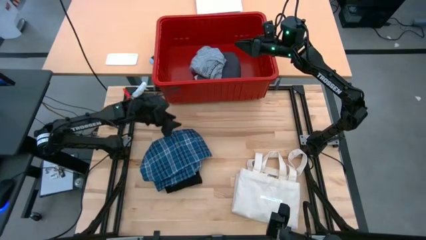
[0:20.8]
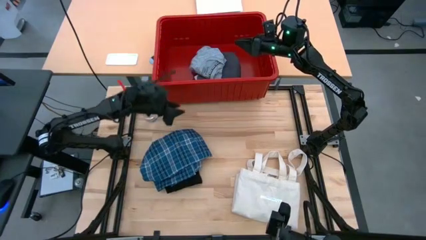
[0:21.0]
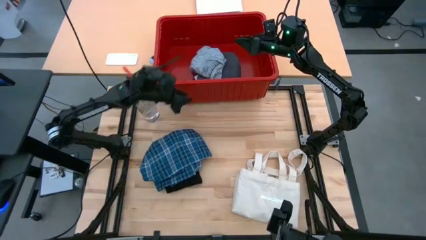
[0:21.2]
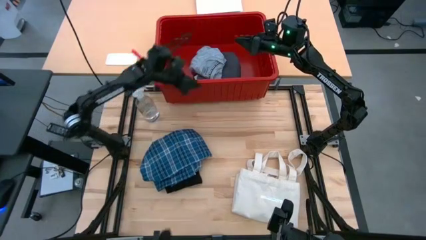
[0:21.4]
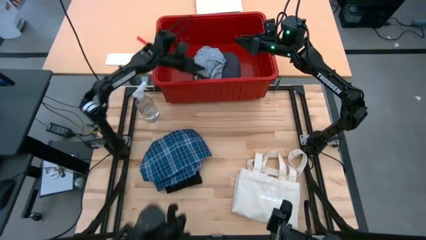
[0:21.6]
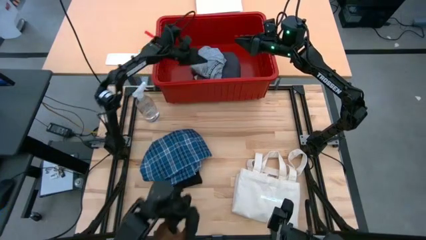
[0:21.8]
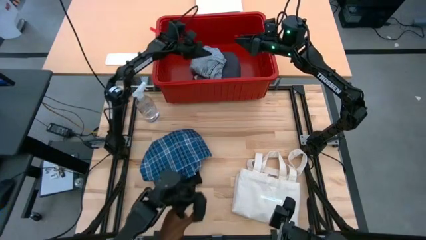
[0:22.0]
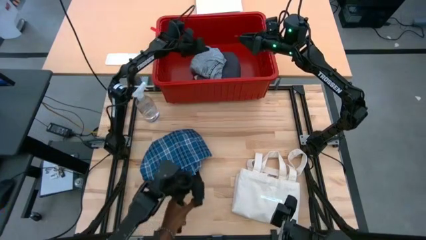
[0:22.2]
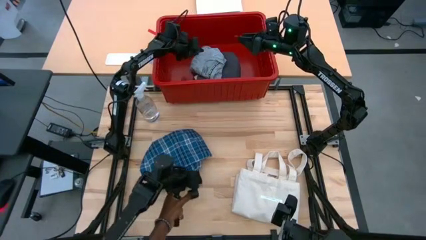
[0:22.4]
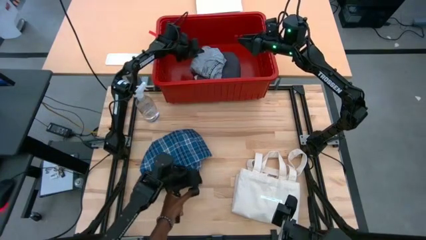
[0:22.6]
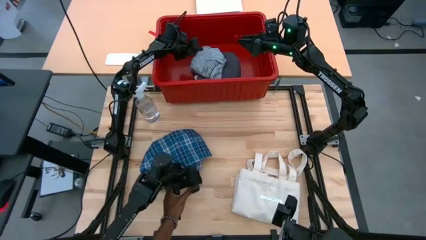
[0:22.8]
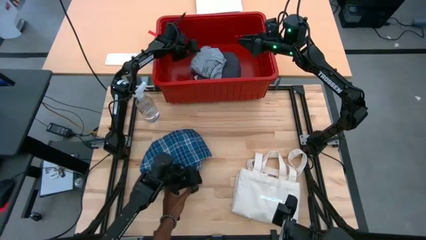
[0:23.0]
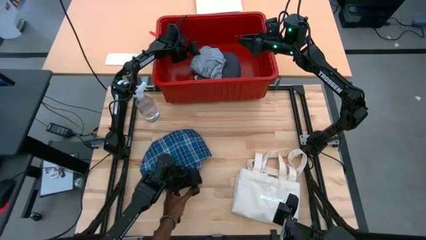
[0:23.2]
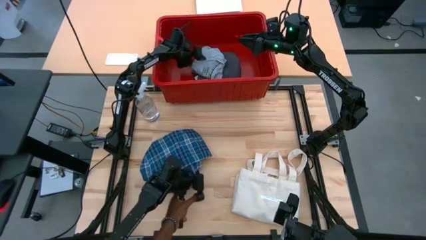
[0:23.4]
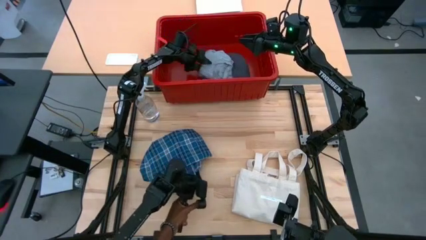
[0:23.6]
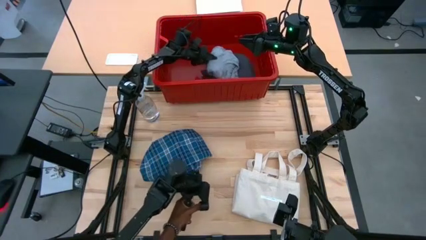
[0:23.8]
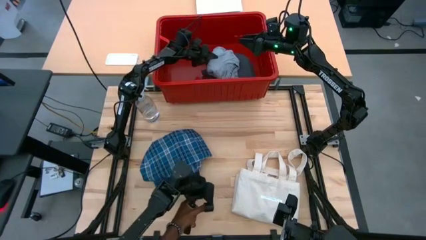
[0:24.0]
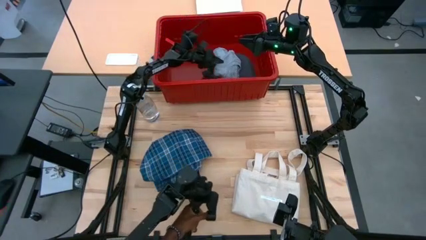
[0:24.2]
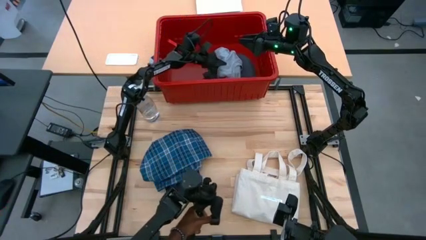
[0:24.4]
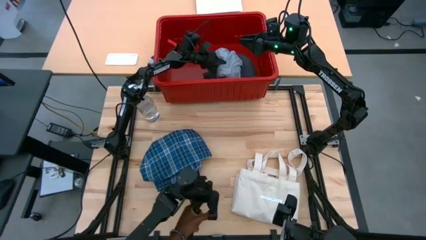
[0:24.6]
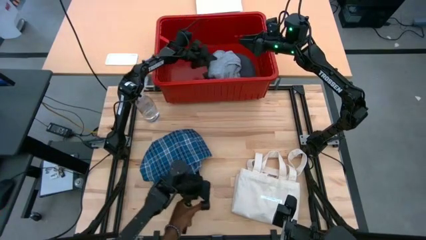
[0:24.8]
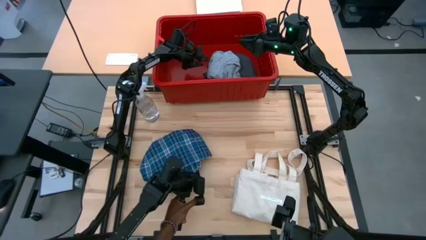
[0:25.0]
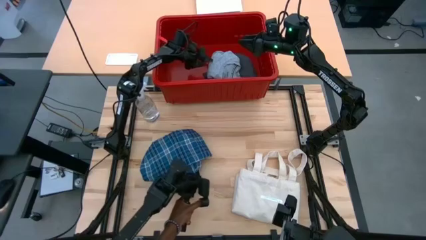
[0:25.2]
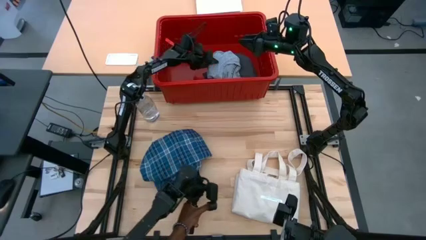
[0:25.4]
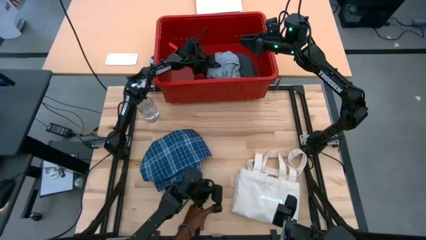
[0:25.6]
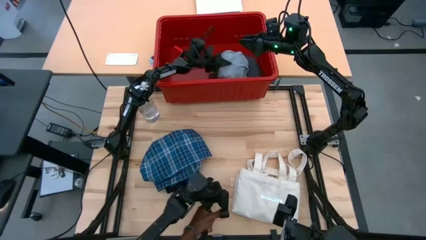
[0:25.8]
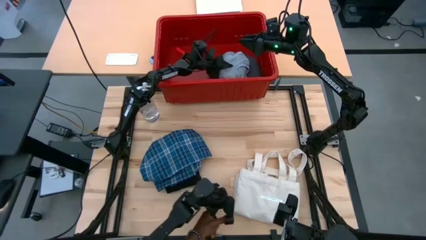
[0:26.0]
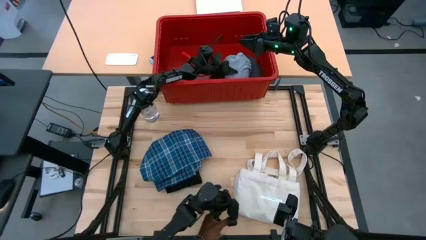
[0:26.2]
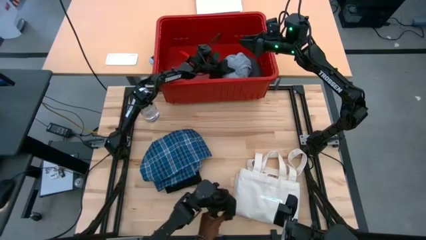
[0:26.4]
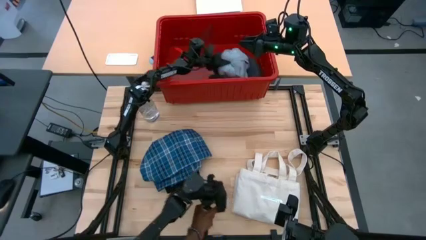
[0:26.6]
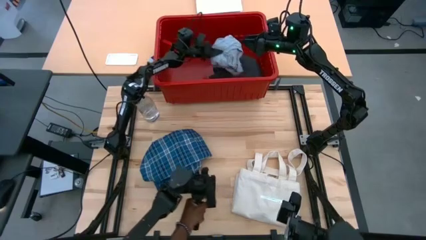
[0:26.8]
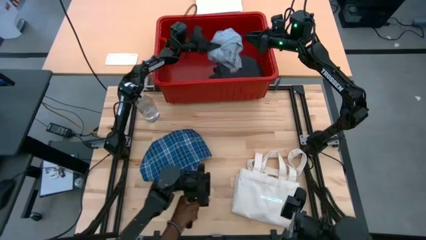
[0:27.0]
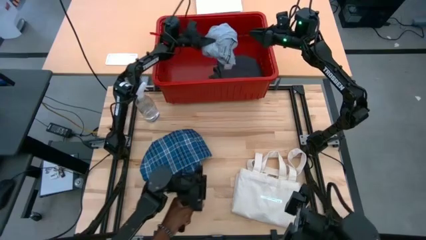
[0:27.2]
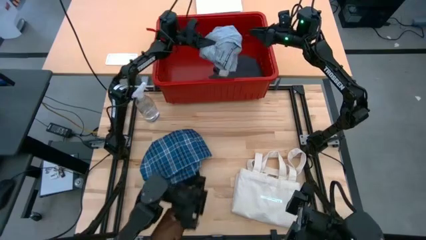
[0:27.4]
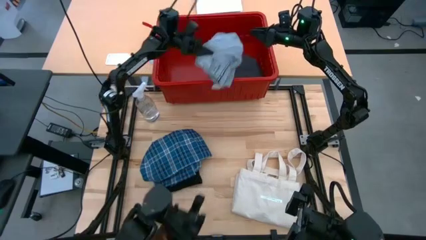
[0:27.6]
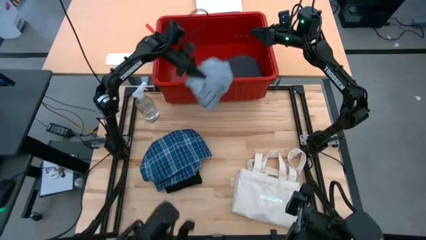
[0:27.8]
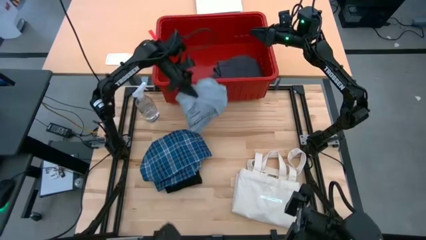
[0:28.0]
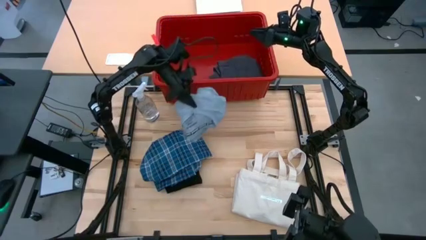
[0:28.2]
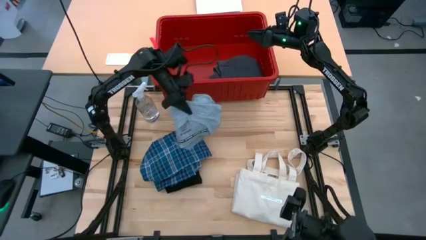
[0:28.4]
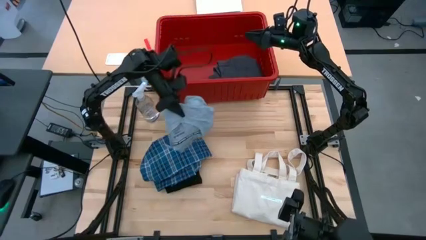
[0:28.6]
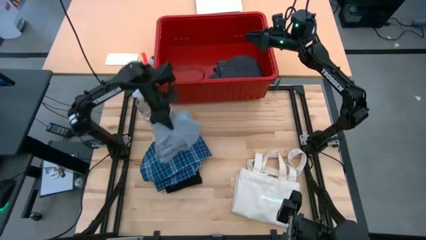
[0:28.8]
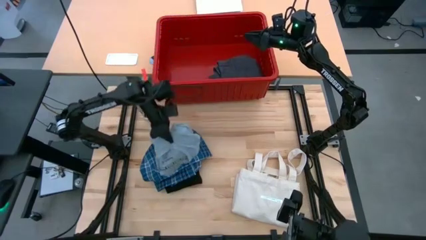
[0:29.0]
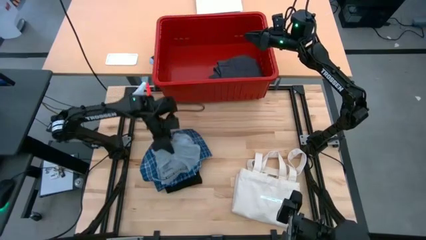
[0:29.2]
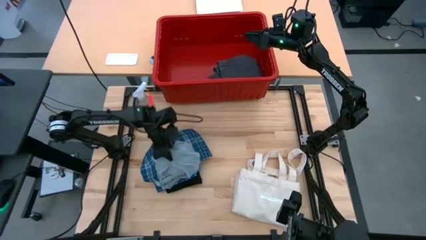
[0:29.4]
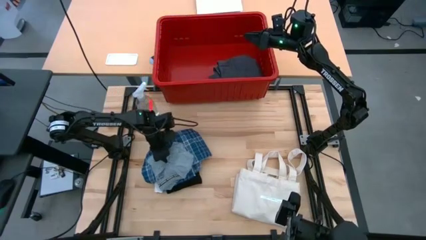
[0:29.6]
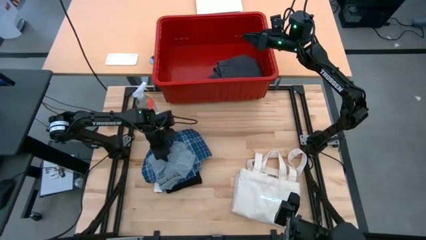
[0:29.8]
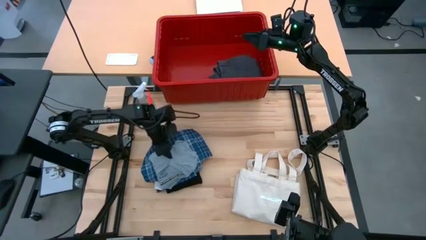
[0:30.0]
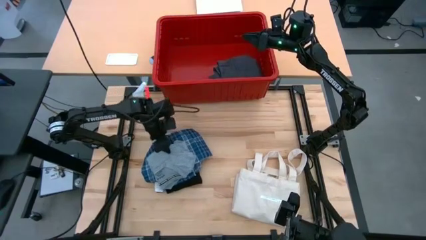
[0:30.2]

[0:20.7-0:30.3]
Task: Fold laundry
Remove the gray shirt from the red bin

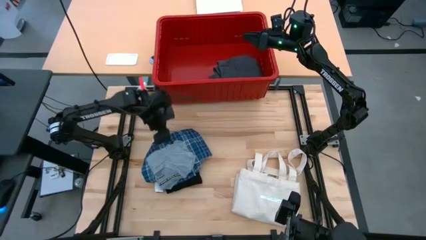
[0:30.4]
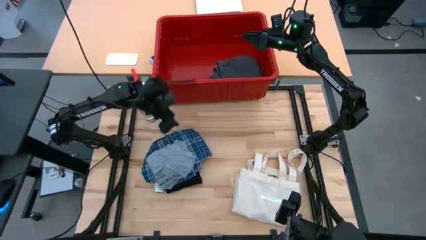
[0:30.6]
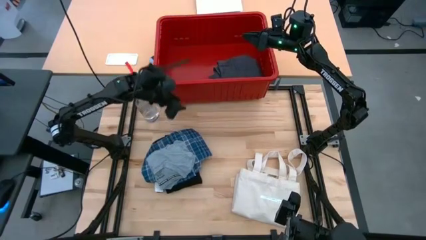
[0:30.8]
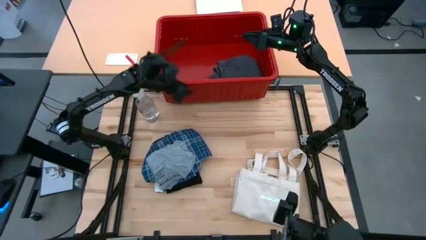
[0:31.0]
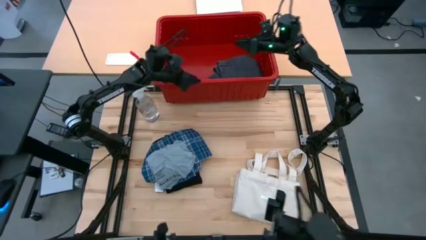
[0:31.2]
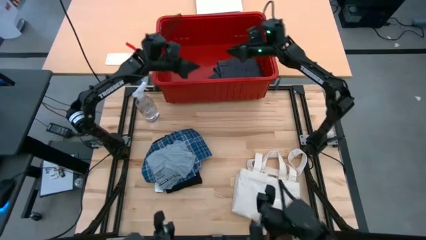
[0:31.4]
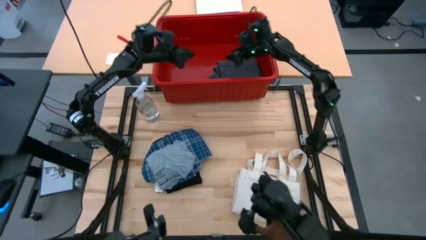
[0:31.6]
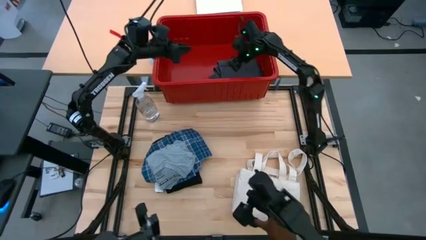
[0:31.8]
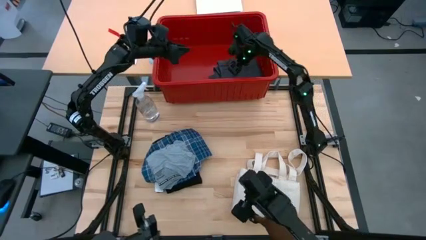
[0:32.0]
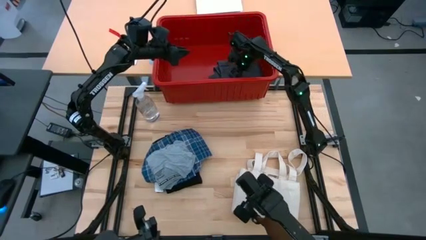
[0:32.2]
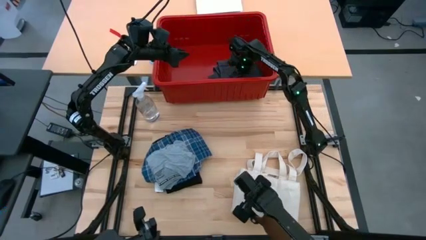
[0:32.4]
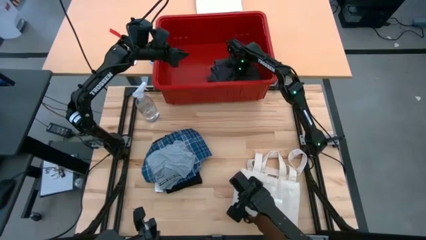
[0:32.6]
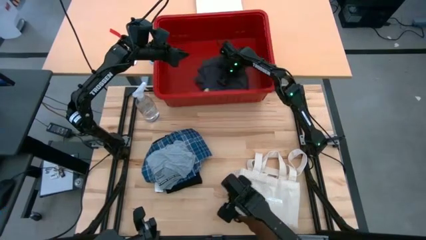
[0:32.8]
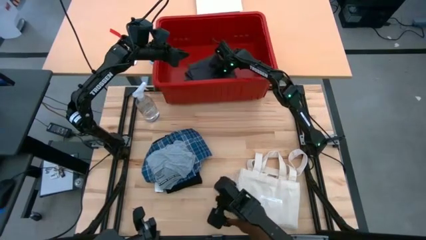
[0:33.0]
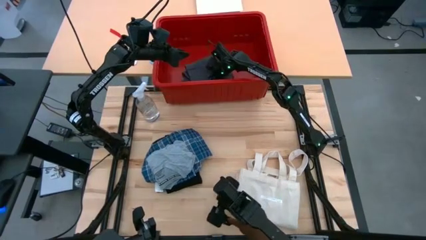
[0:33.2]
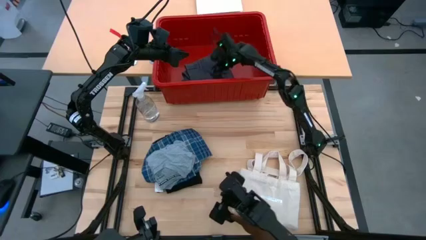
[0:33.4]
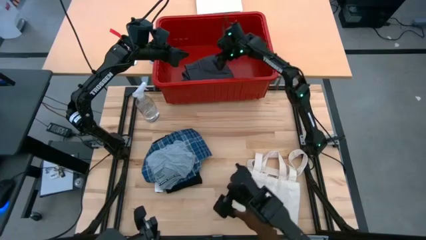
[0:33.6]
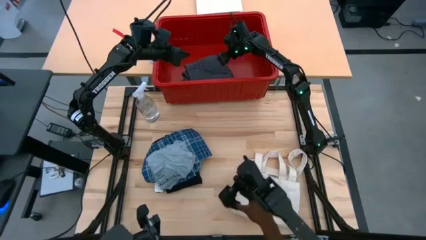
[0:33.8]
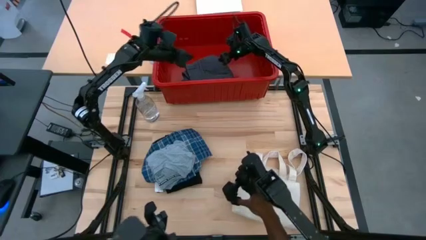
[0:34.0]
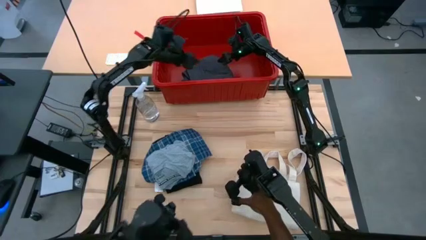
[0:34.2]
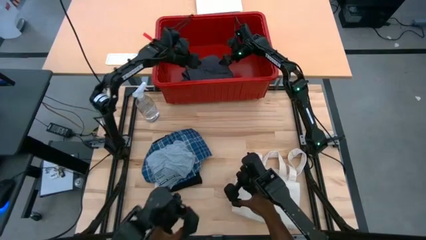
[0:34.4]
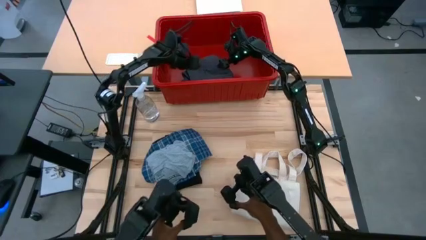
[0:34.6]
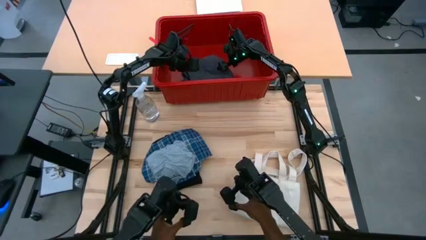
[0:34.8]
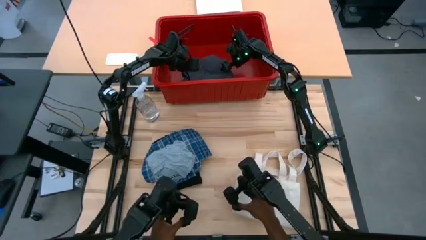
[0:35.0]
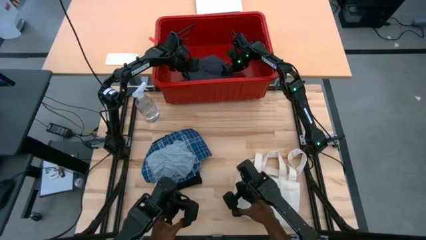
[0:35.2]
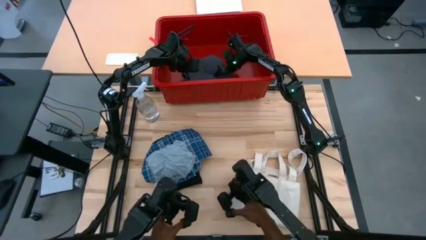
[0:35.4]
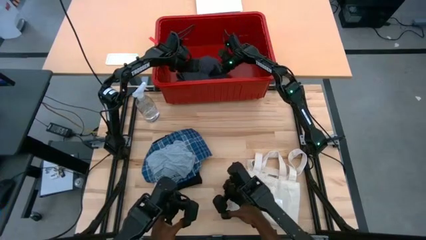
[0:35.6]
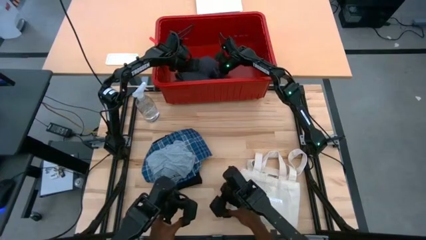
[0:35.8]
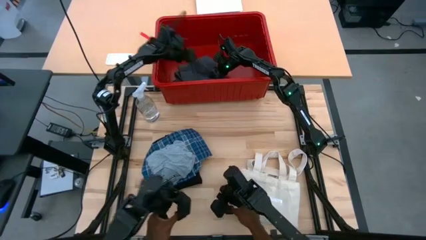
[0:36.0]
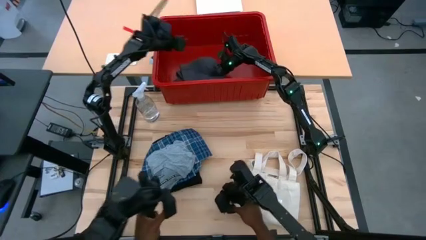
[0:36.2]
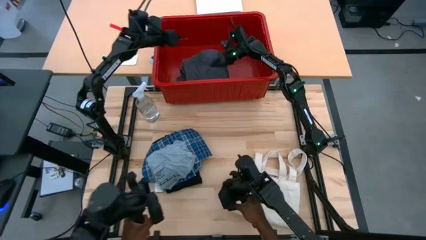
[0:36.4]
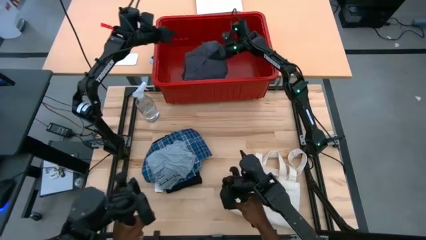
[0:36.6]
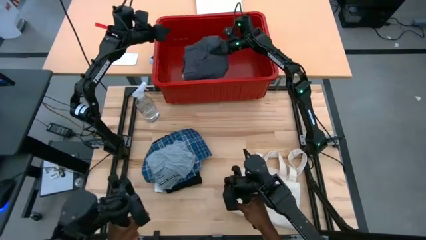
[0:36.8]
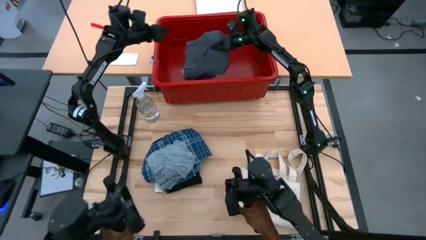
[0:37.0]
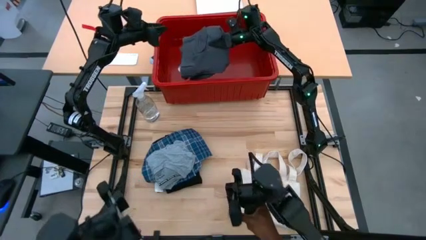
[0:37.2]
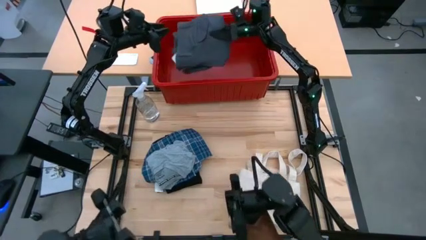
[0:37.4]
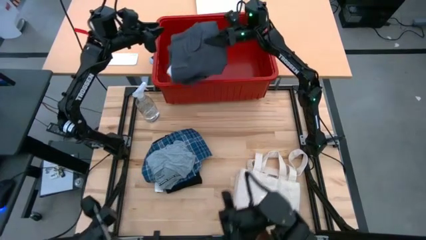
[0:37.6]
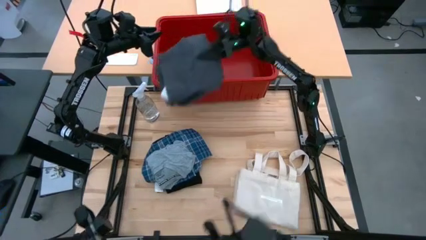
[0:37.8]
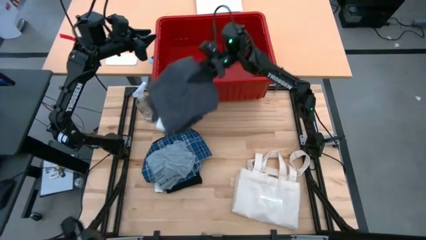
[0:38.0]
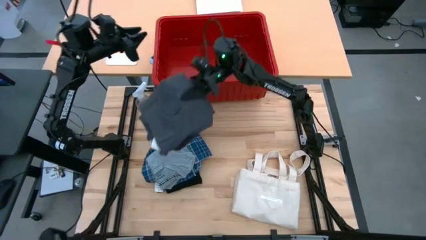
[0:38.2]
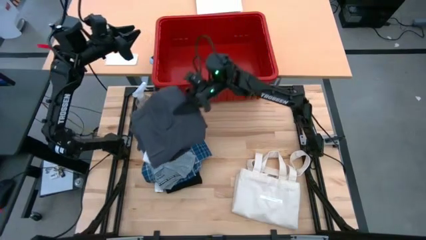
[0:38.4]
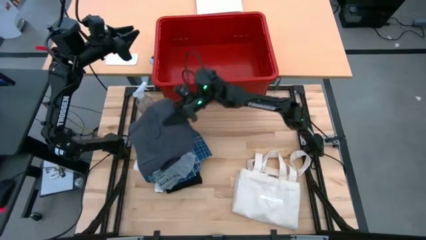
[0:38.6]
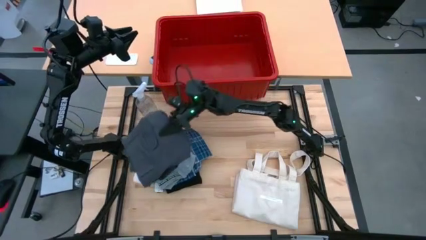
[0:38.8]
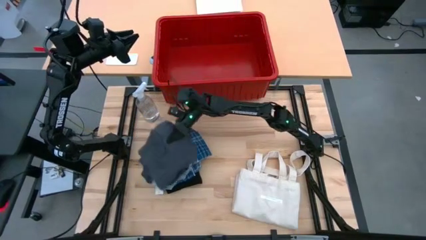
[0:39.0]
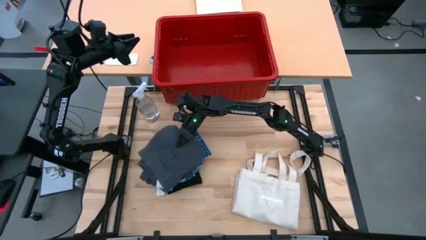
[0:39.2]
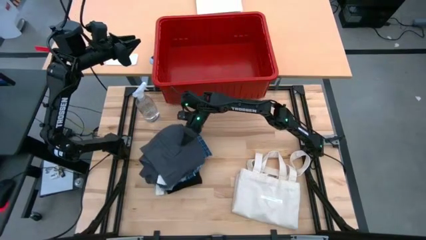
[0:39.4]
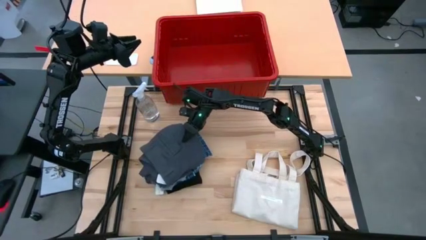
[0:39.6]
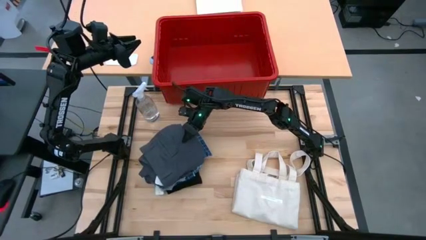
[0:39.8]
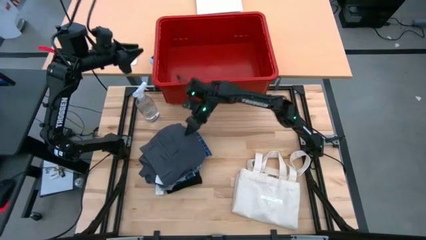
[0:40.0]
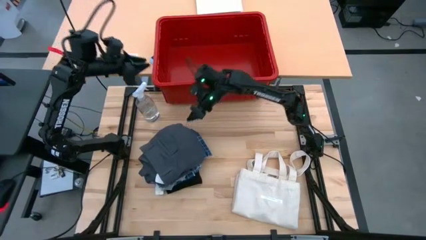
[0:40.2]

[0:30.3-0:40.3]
Remove the gray pants from the red bin
